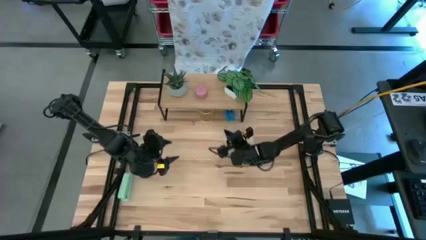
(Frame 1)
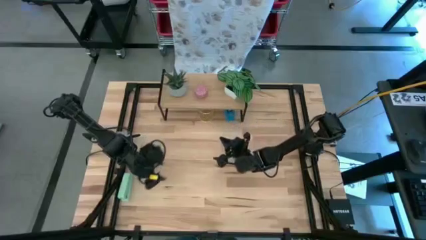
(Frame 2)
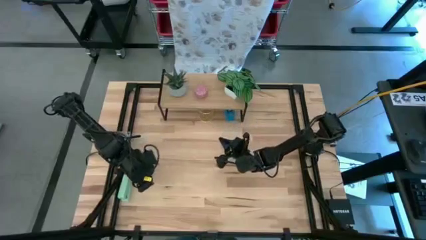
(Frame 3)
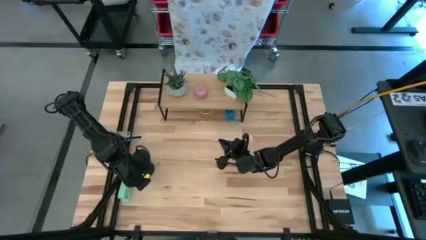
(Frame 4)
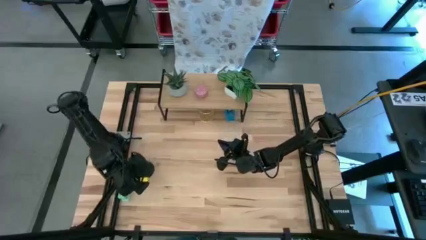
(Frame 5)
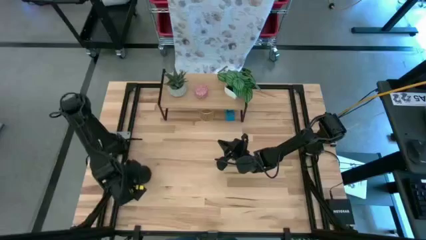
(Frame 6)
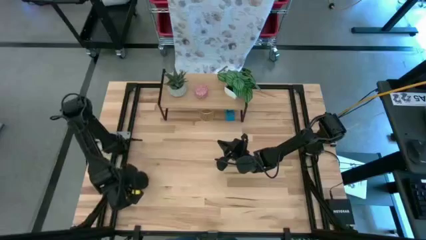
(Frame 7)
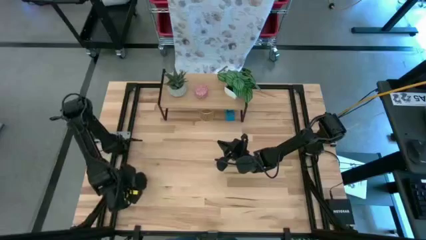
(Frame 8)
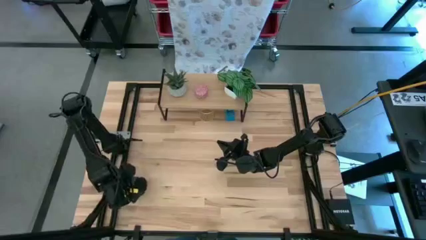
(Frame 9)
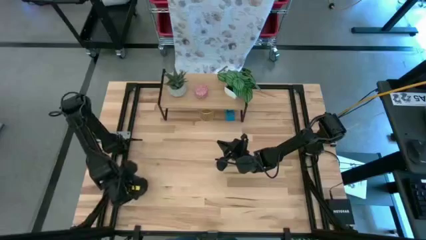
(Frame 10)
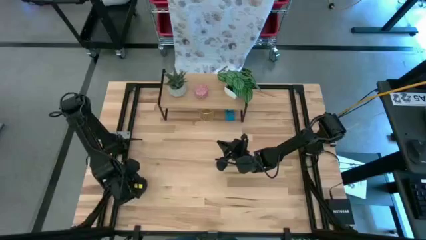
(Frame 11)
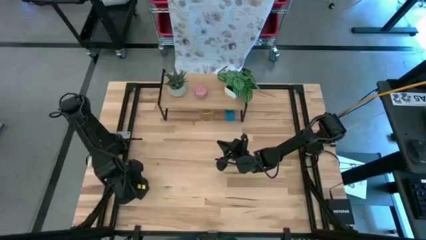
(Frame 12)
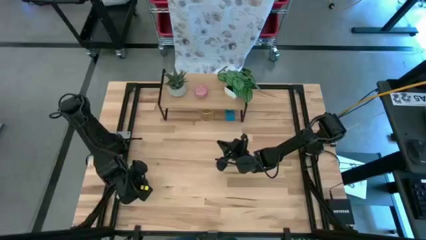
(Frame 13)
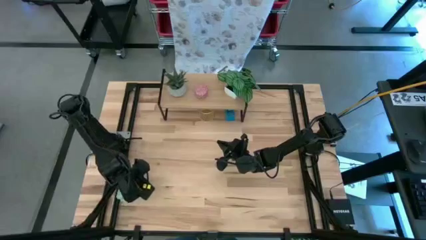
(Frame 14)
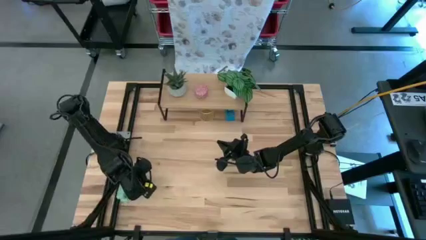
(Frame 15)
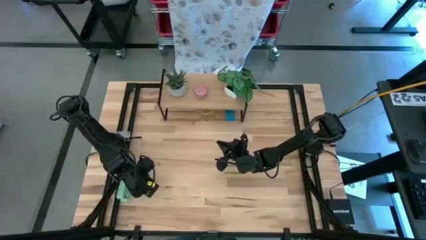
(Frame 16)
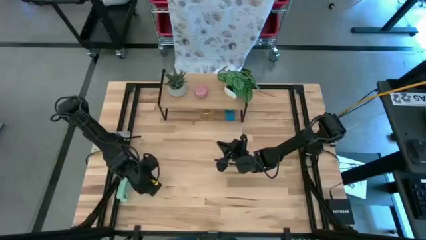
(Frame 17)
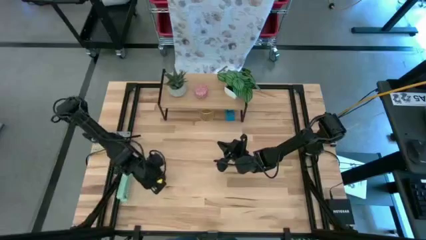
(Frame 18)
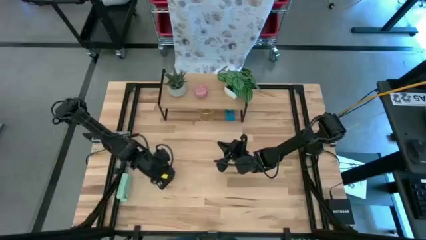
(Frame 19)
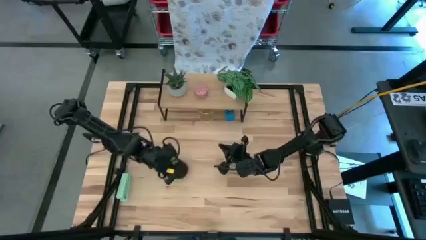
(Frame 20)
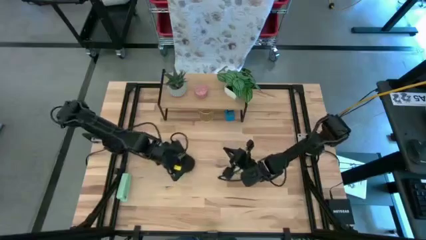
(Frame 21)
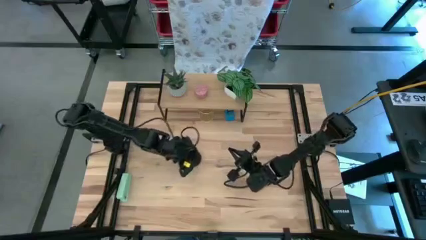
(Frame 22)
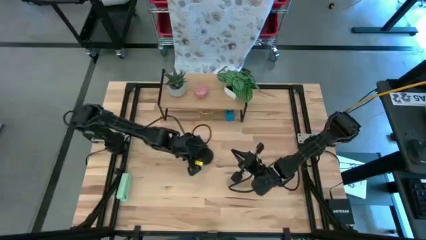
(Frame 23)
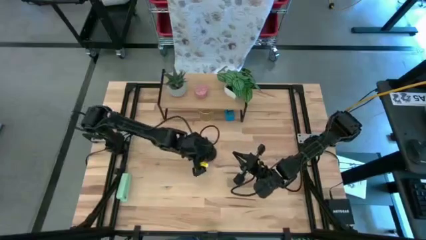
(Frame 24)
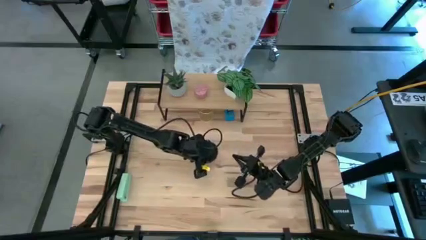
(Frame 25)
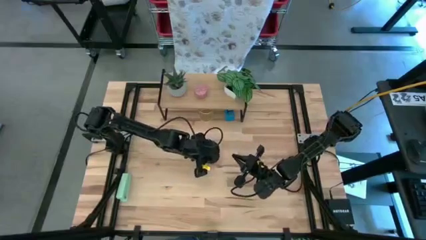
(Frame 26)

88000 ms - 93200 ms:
Task: Stock shelves
Move the black pen holder in the center of the table

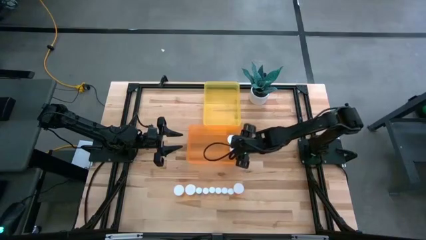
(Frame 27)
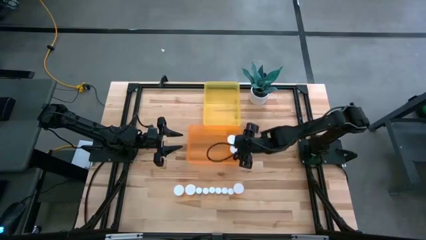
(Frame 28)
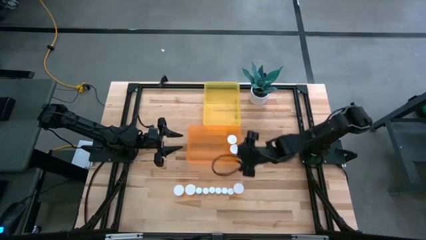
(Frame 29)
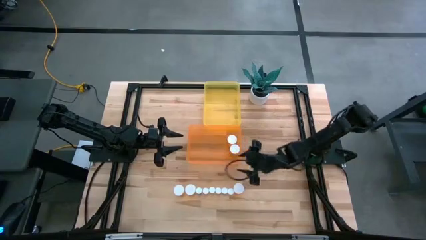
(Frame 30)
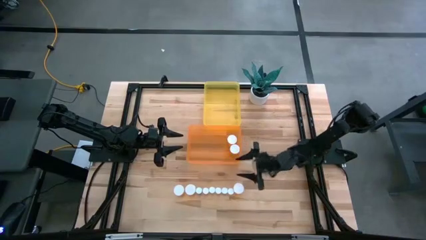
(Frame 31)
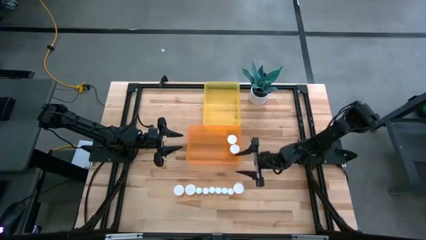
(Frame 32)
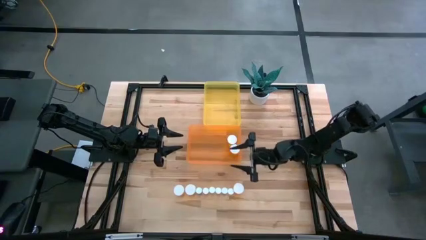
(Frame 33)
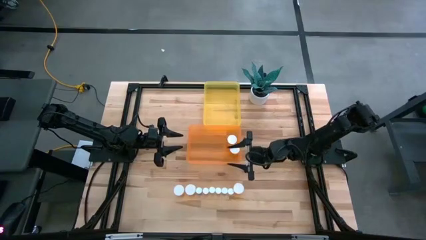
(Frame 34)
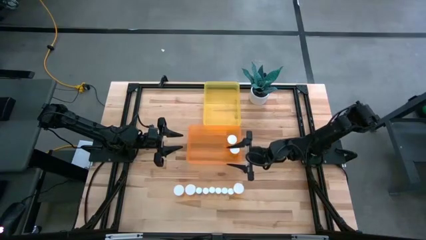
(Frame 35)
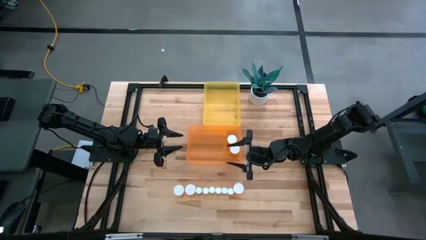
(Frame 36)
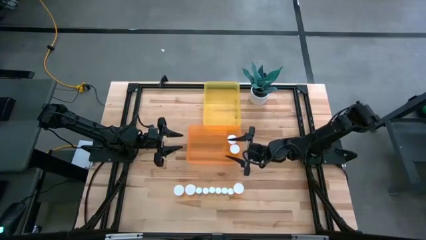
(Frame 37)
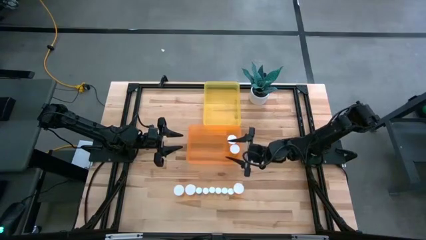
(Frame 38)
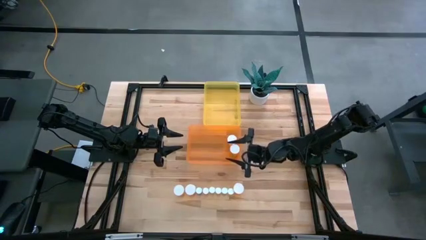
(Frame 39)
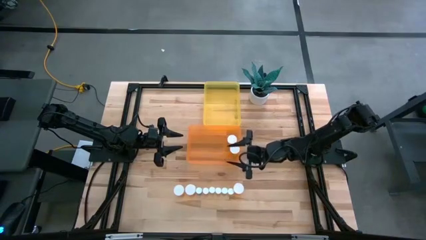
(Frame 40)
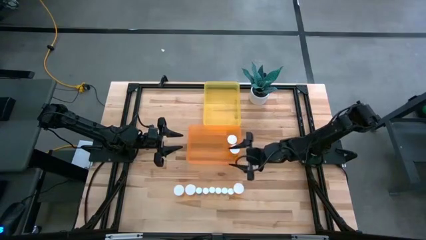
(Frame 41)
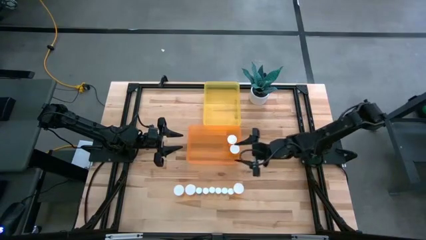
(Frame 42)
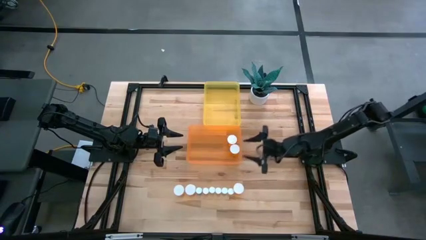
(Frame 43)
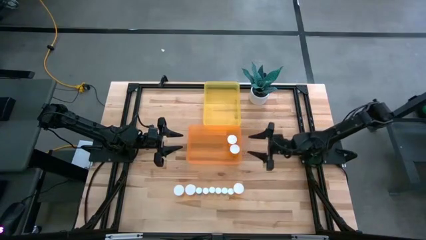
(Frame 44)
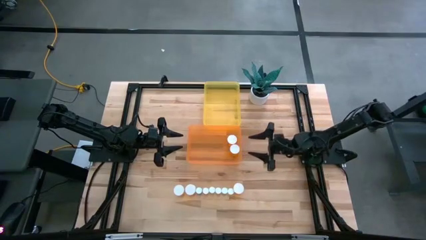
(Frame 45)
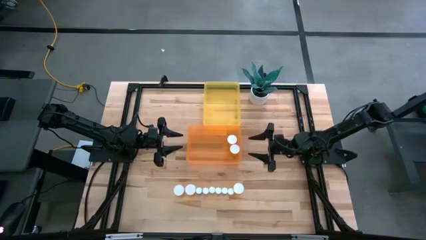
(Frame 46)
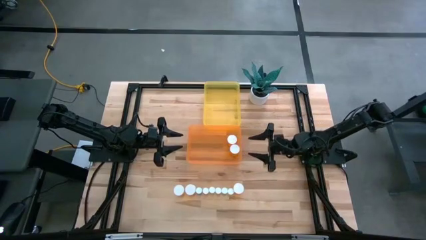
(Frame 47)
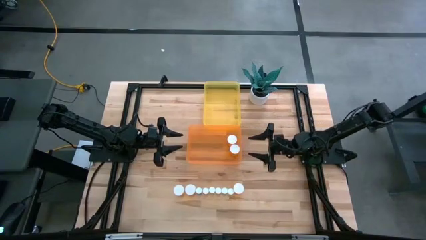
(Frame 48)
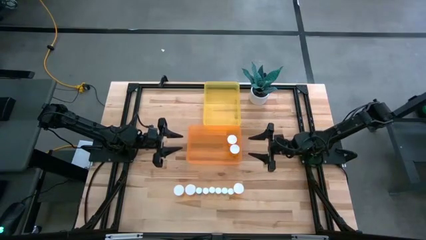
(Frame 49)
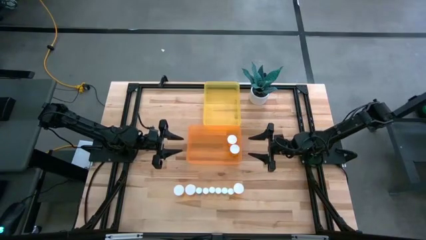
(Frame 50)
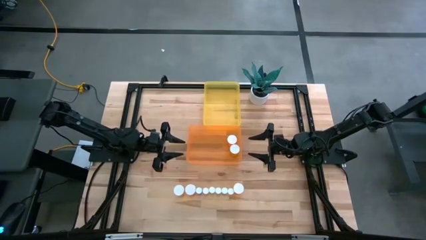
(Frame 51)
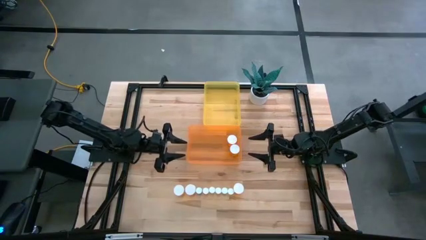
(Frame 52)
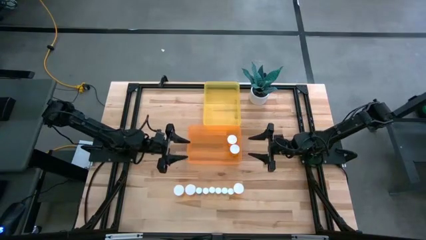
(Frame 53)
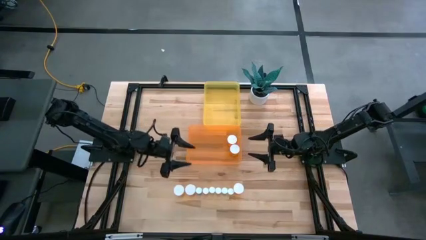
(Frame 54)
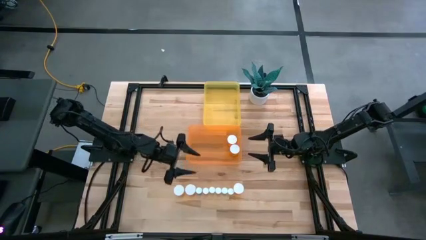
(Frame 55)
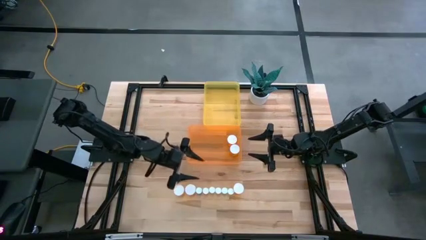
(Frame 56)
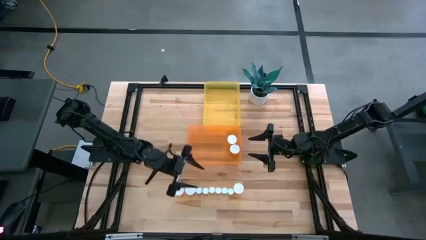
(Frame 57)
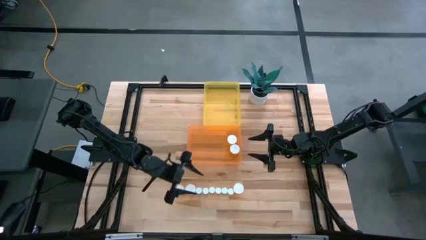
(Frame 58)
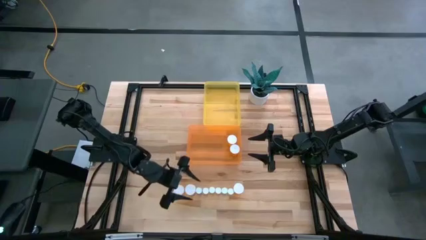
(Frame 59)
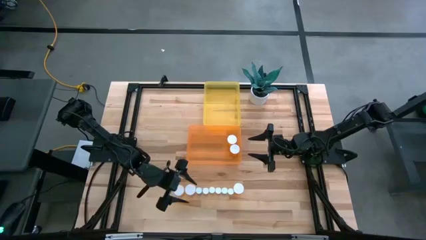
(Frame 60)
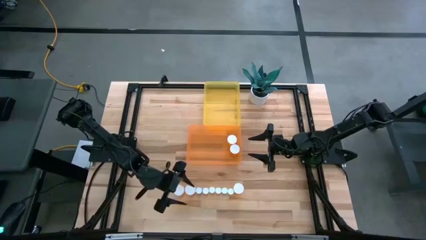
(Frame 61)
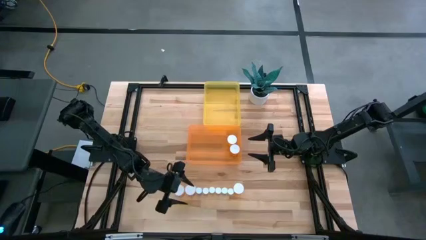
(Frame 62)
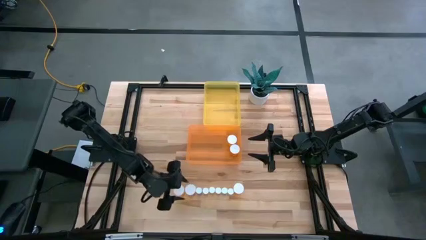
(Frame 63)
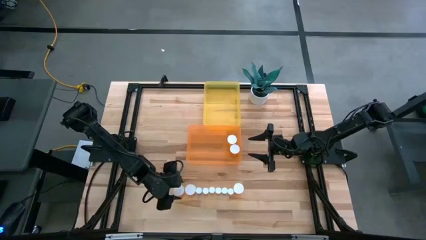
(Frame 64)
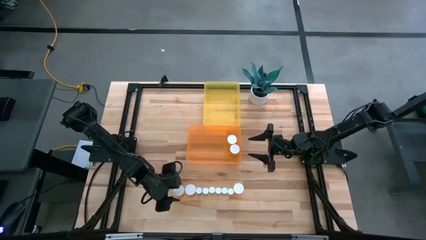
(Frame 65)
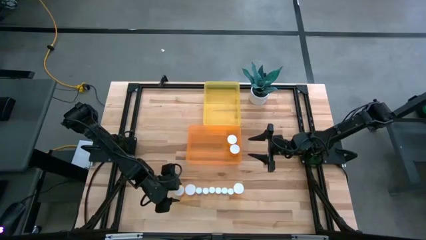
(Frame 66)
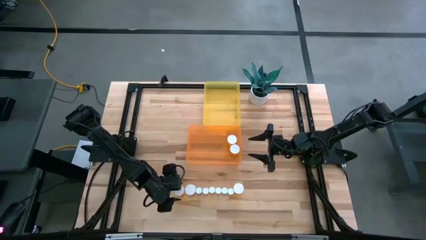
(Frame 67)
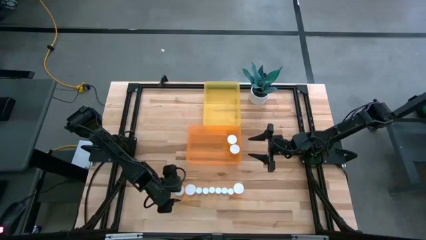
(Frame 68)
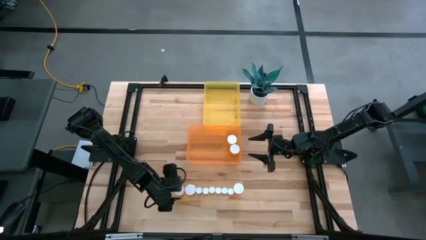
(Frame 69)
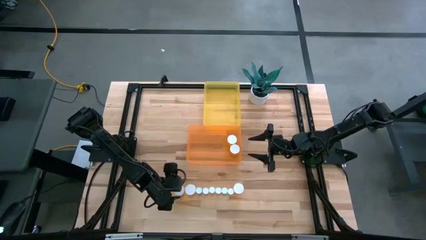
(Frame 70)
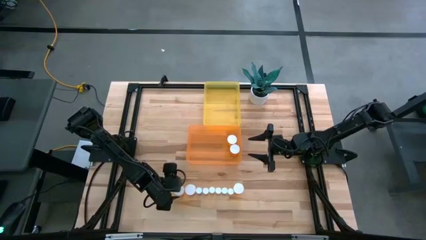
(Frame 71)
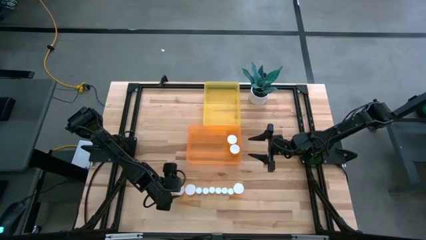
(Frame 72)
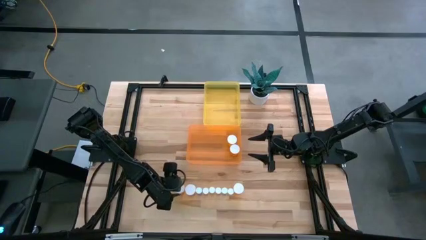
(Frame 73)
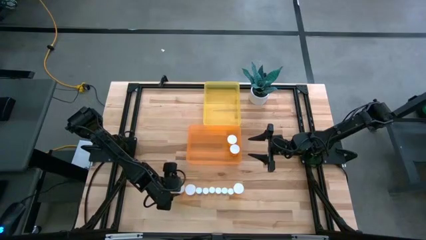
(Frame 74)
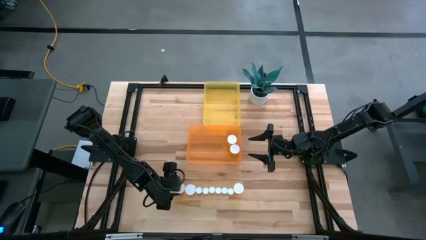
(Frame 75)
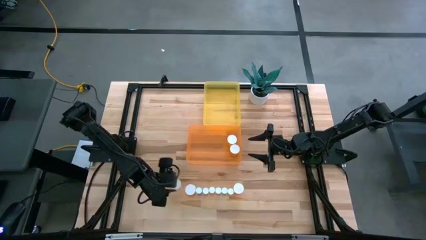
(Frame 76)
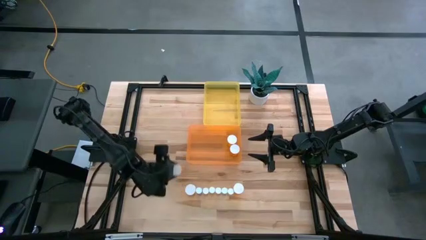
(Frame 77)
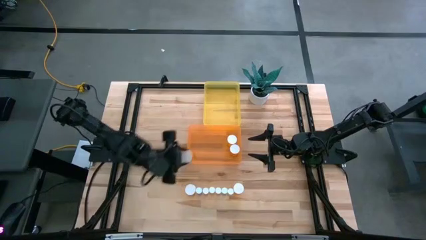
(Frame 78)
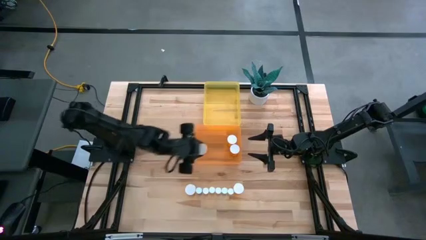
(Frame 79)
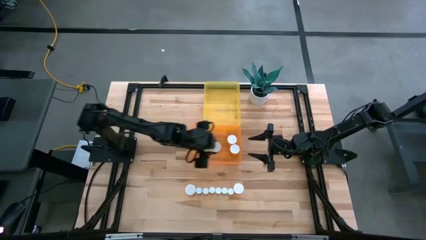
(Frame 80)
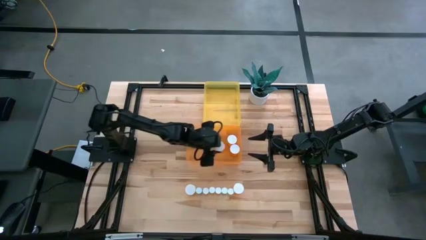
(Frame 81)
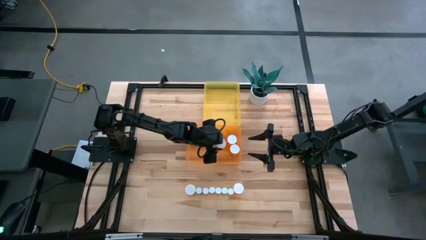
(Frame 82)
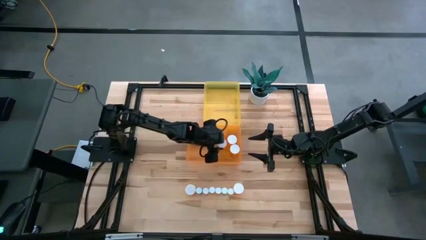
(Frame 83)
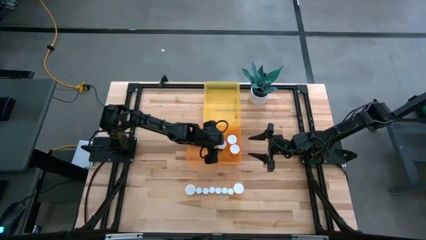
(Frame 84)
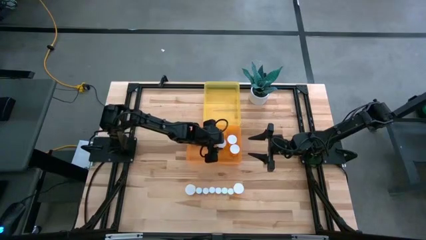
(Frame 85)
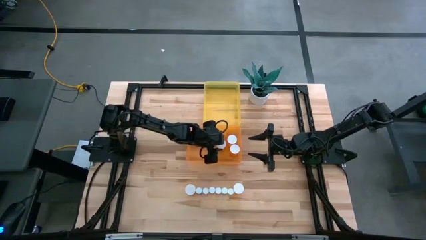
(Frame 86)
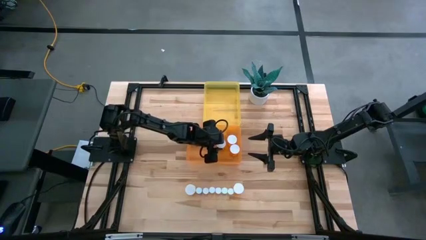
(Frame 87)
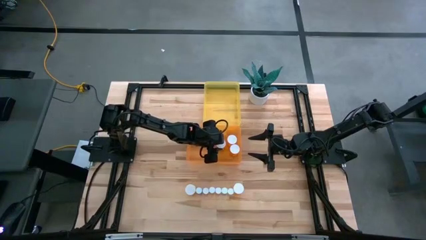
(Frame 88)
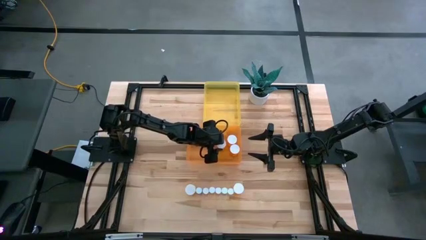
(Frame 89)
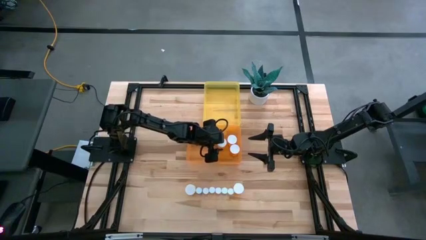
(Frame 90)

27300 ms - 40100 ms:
Task: Pick and place medicine bottles into bin by pill shape (circle, oval)
Put the big orange pill bottle into the orange bin
